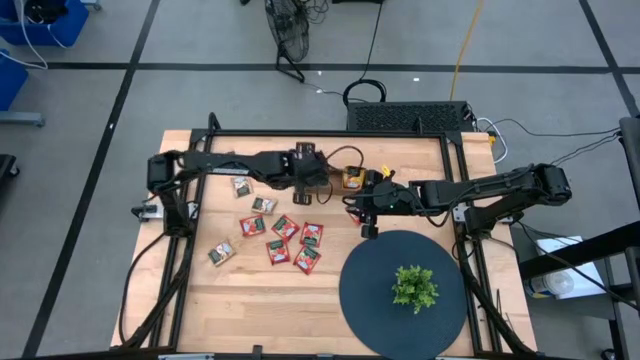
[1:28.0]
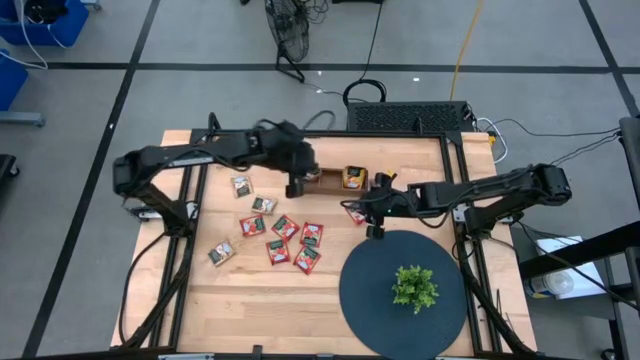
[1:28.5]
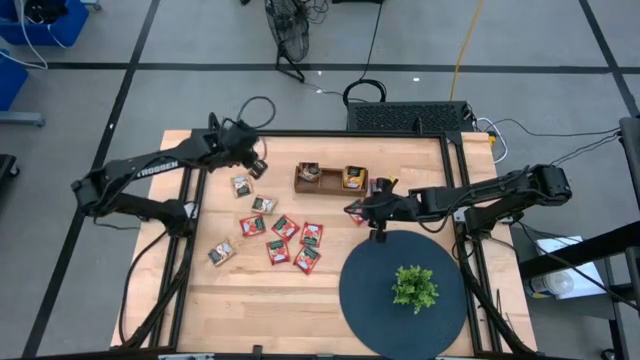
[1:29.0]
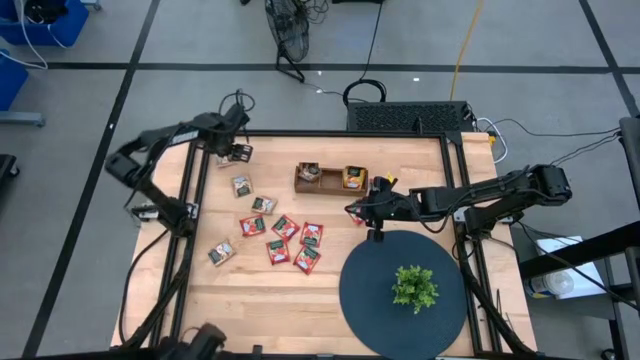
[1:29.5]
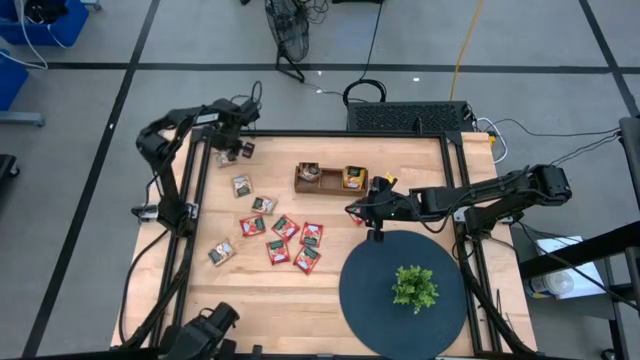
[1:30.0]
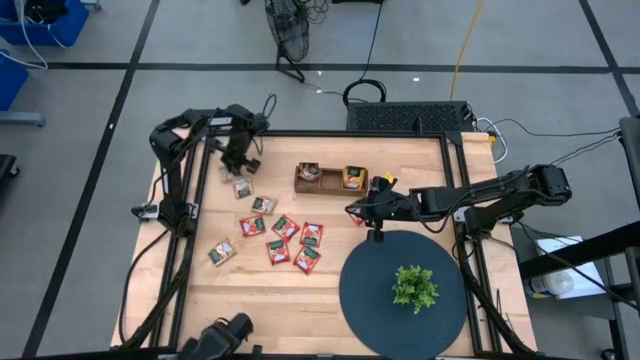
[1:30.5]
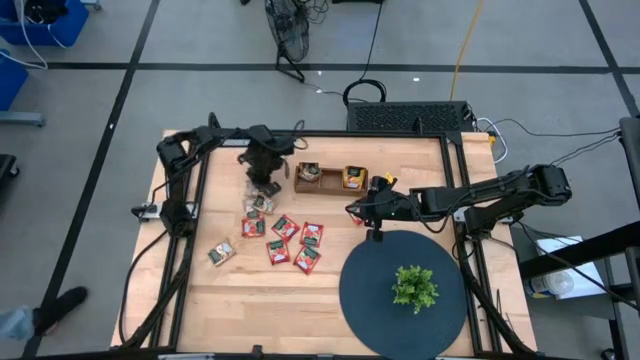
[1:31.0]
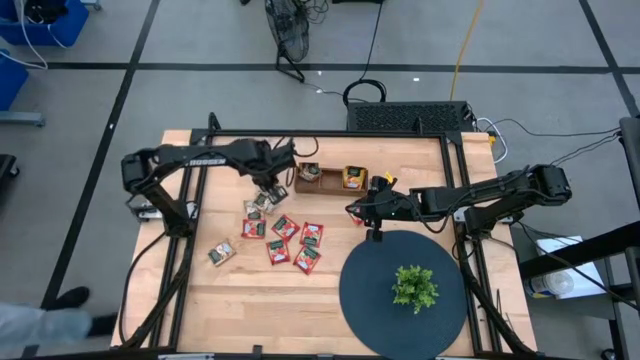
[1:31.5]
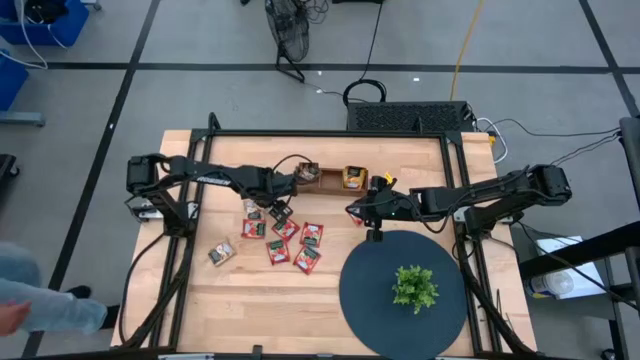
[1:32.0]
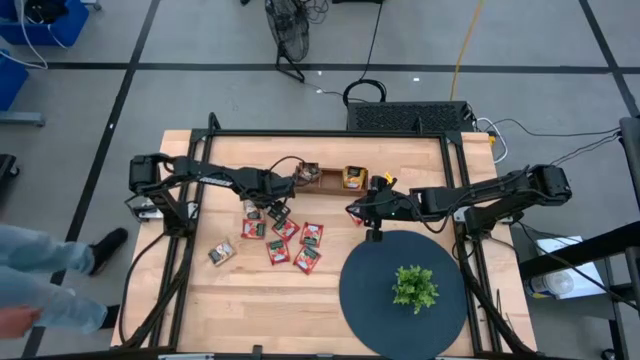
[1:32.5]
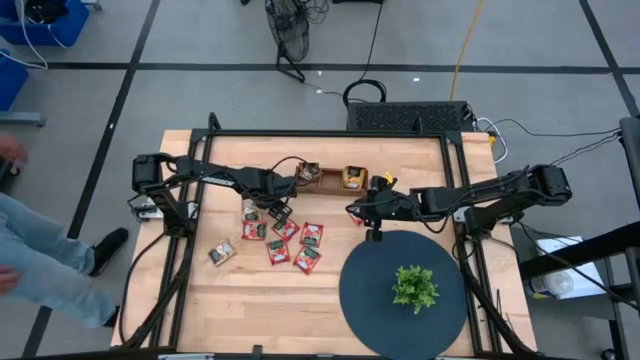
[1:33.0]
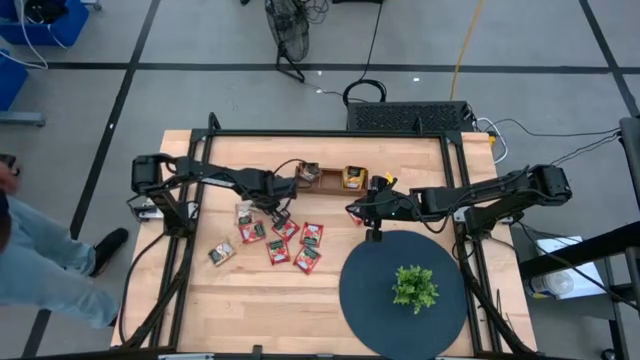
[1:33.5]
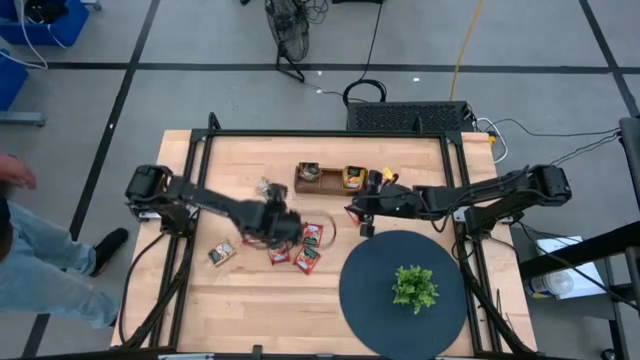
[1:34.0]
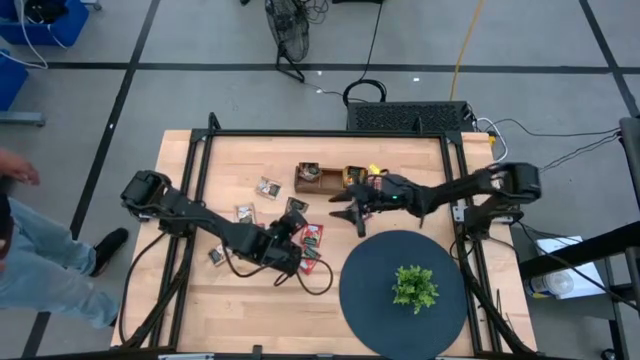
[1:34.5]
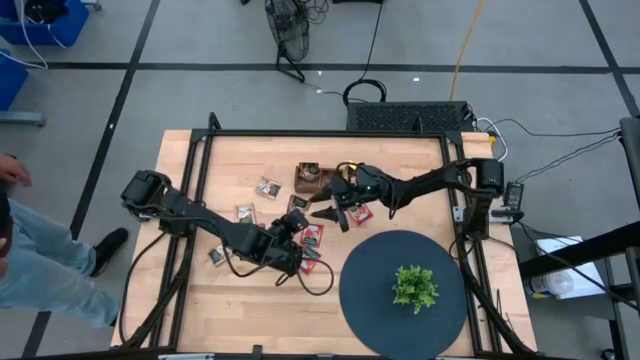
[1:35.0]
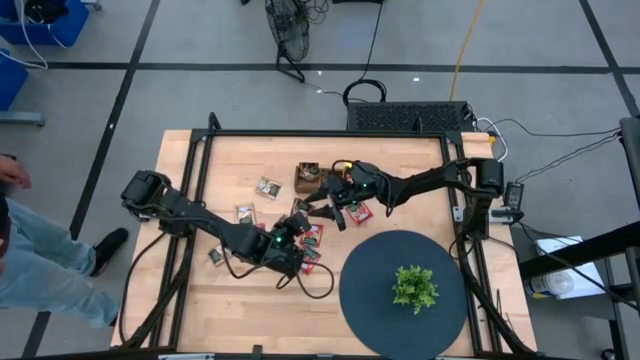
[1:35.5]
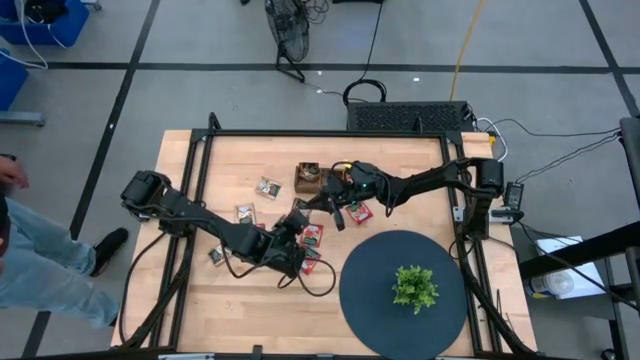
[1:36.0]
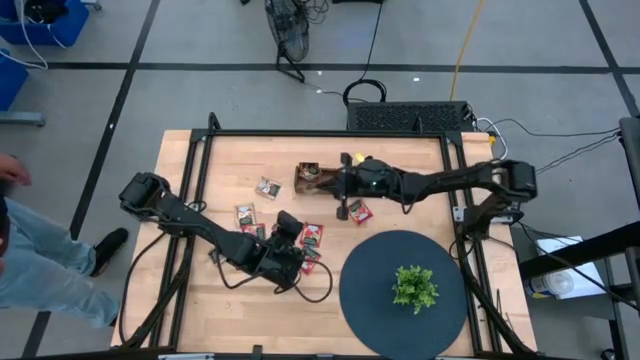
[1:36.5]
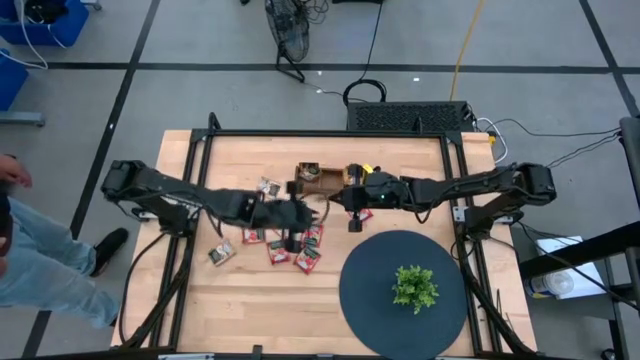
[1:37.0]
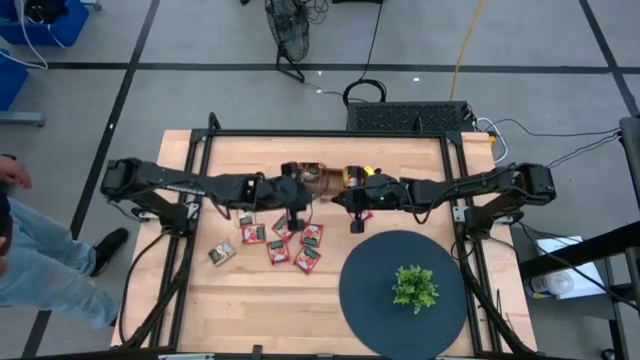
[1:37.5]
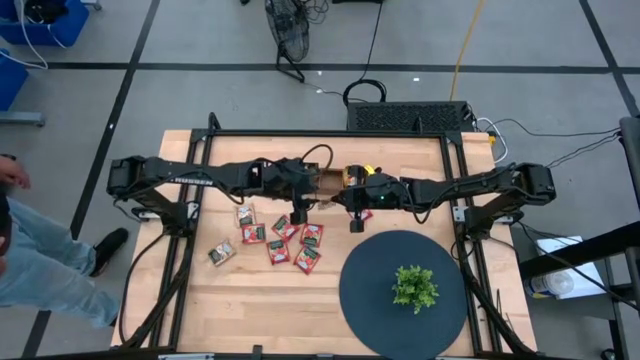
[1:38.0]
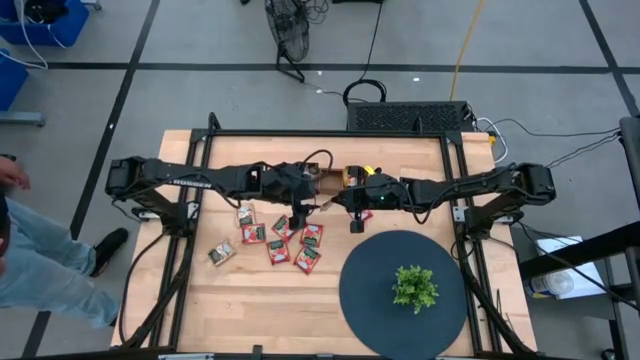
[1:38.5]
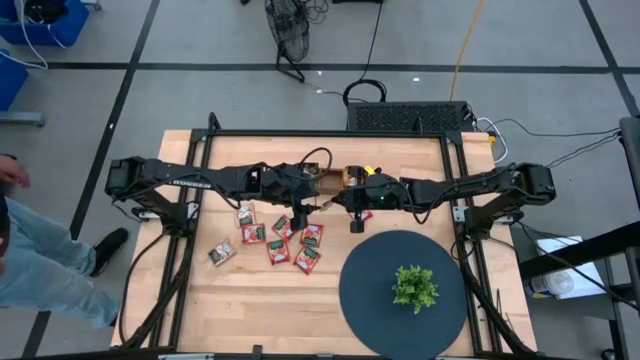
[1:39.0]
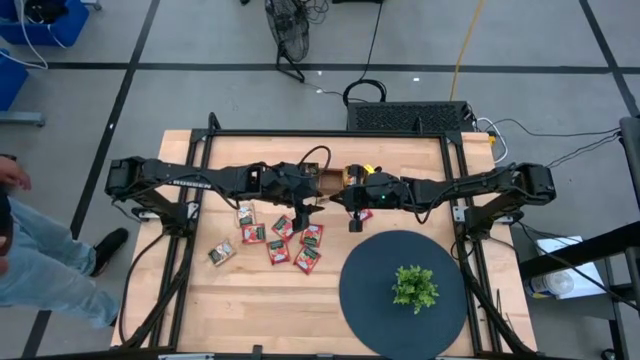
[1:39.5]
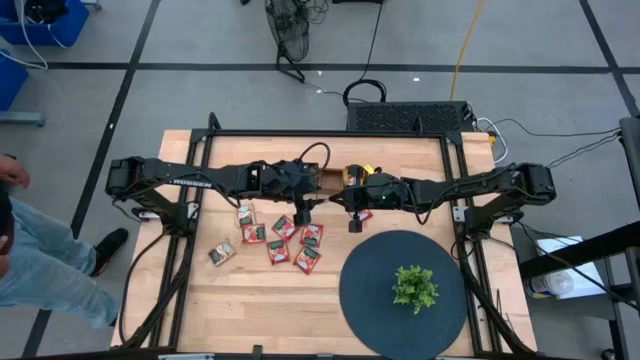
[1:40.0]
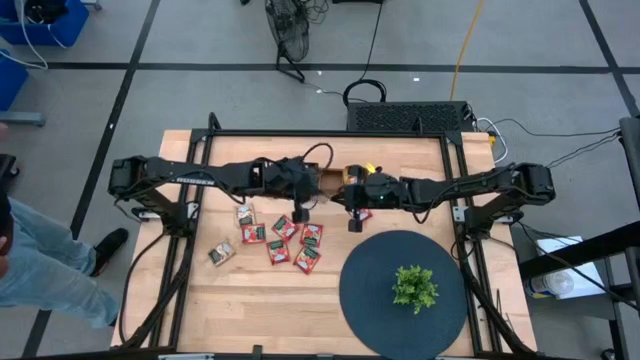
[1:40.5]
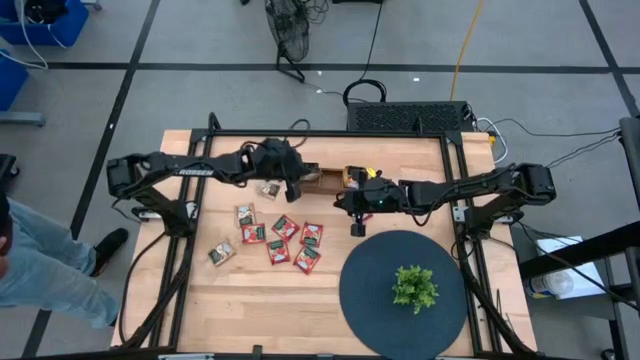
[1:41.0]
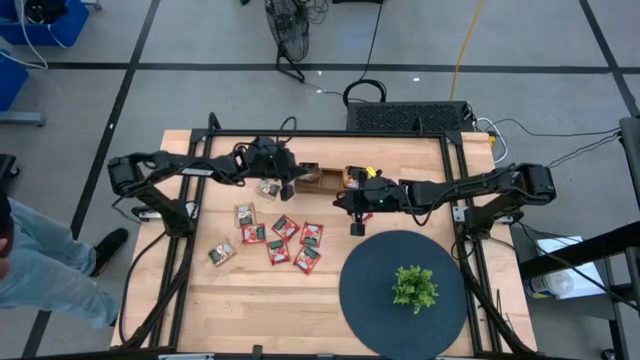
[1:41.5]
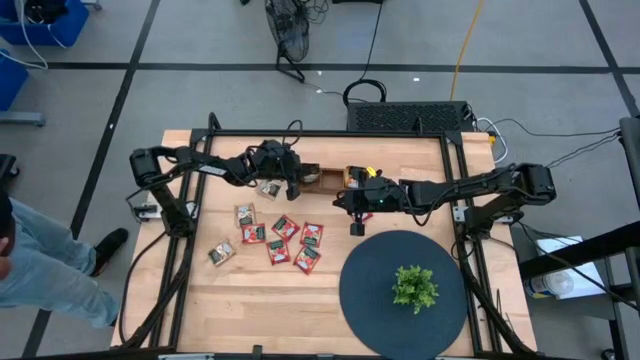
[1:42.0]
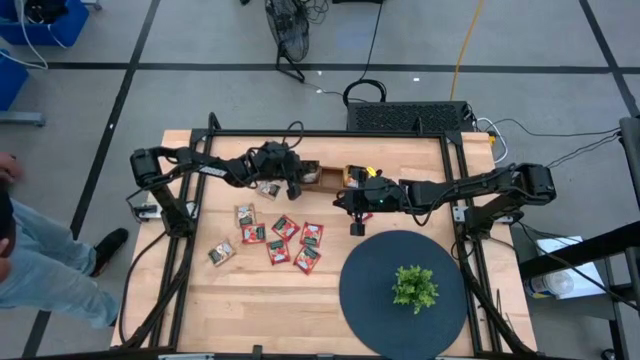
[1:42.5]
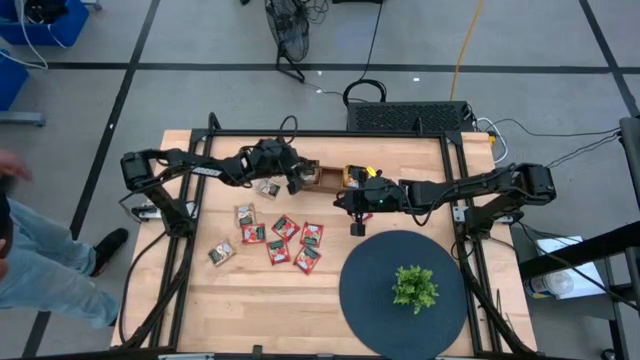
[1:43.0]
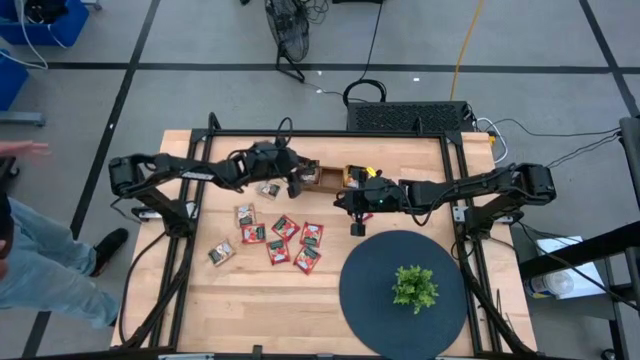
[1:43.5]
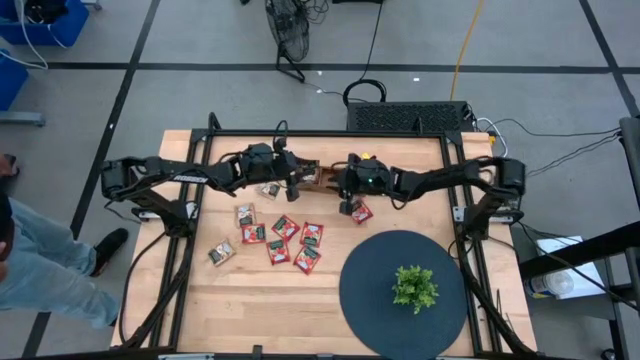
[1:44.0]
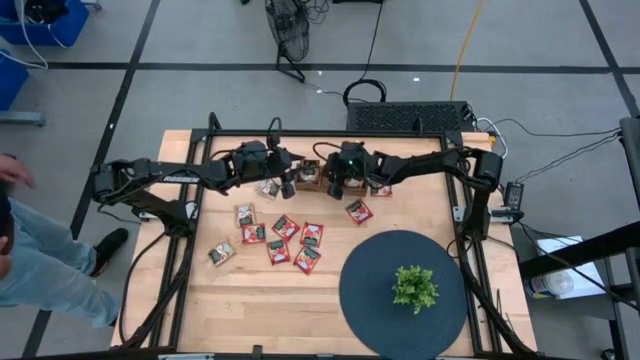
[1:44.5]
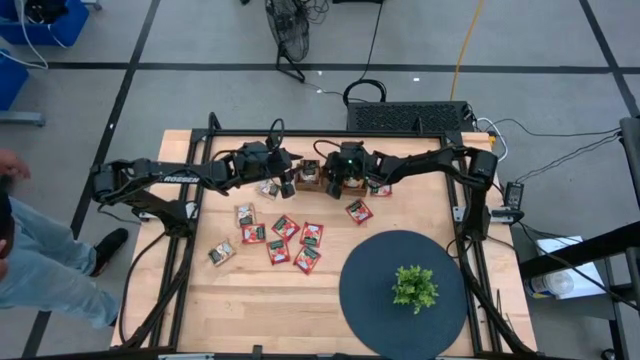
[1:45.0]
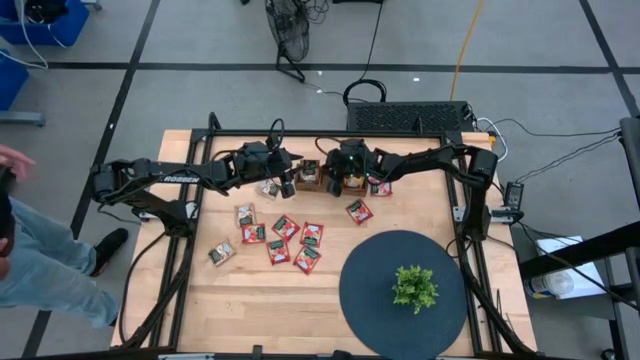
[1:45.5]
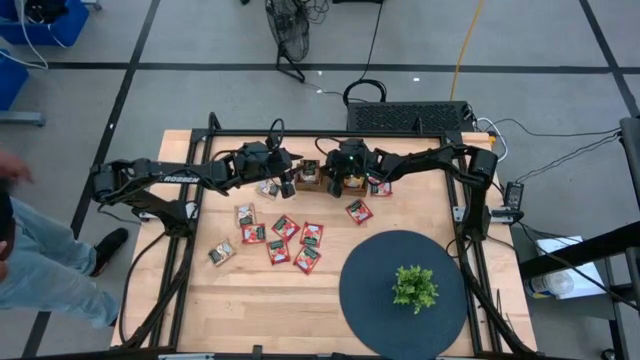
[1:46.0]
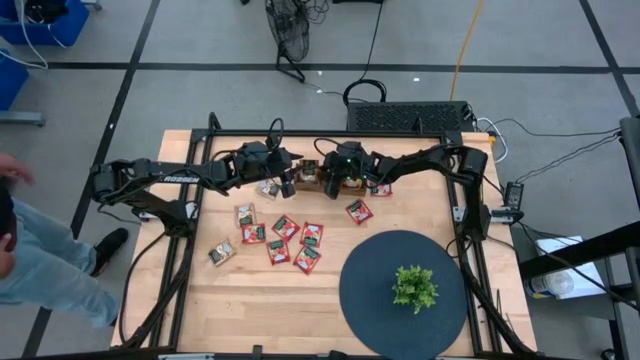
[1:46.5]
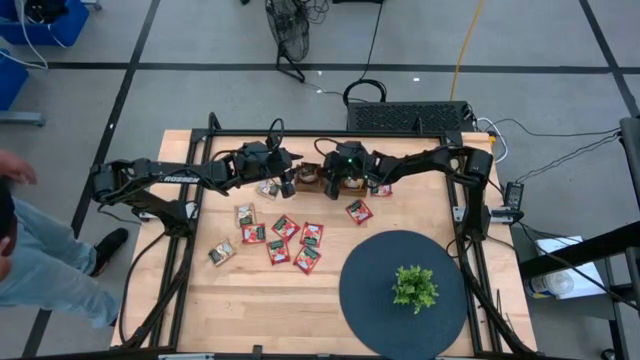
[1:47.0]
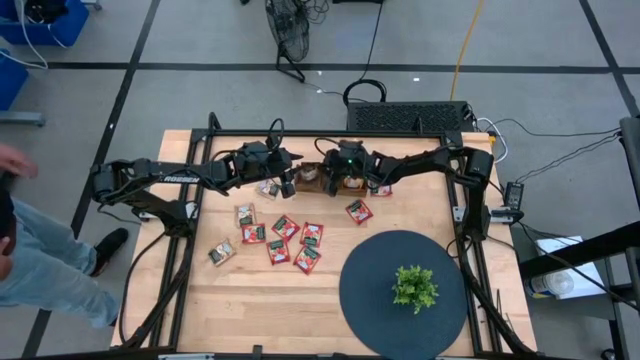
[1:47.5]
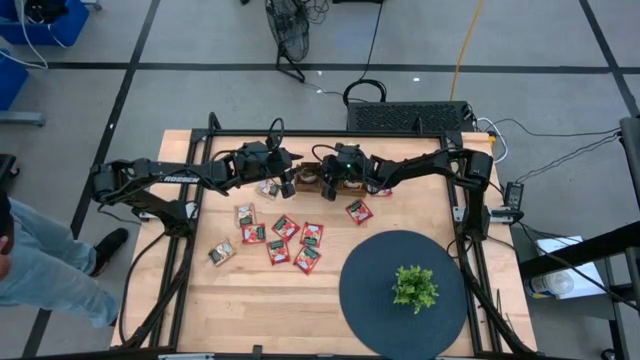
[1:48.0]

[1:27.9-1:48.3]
Task: Pick & Place Tea
Put the brown tea bag into the left section wooden organizer
